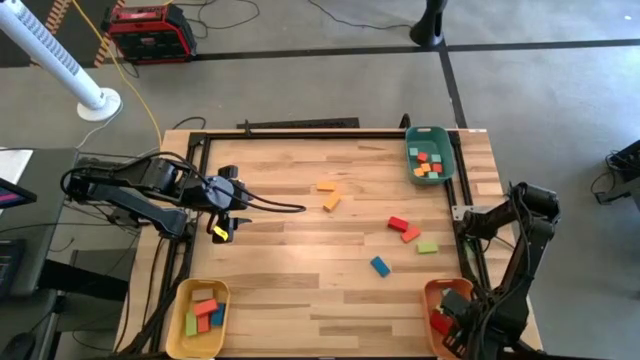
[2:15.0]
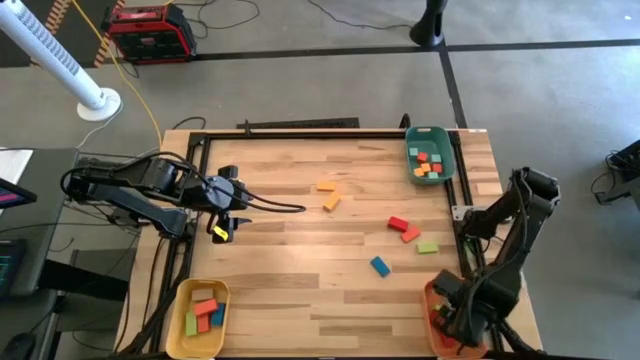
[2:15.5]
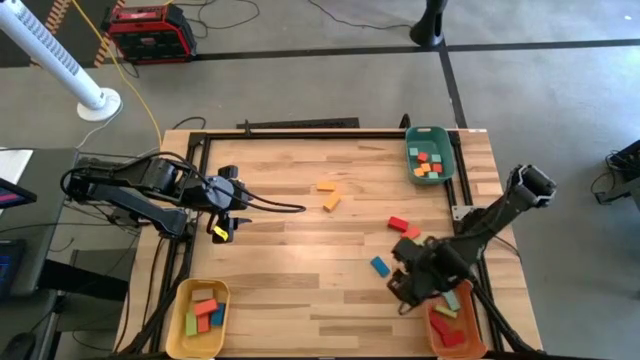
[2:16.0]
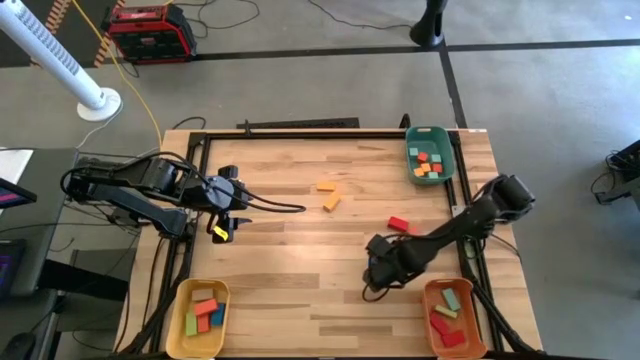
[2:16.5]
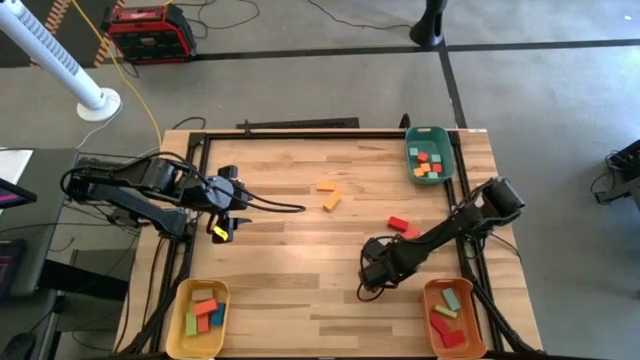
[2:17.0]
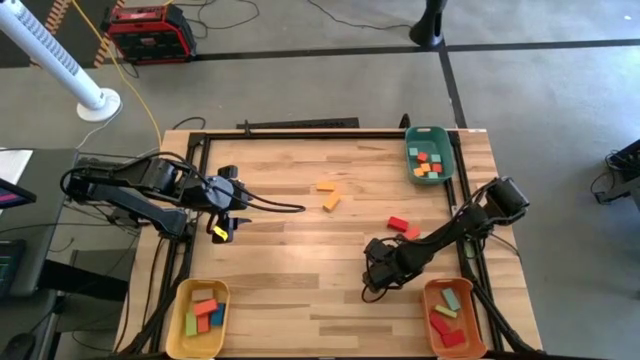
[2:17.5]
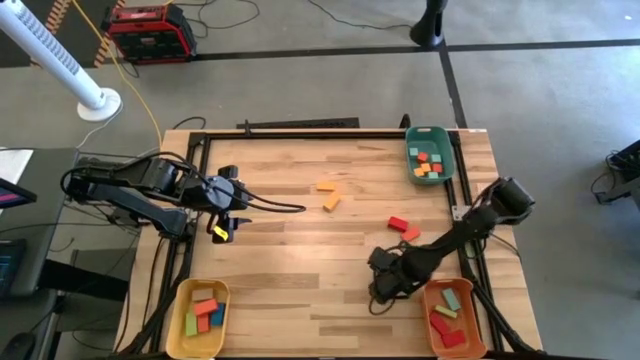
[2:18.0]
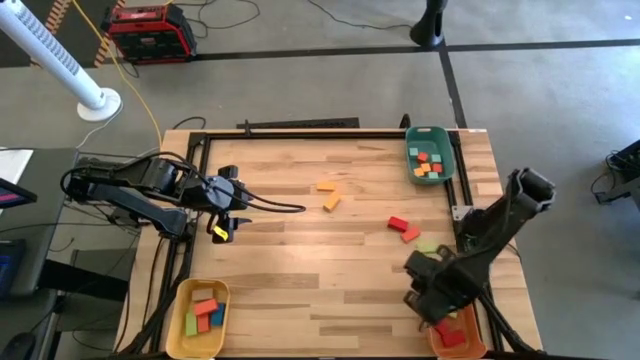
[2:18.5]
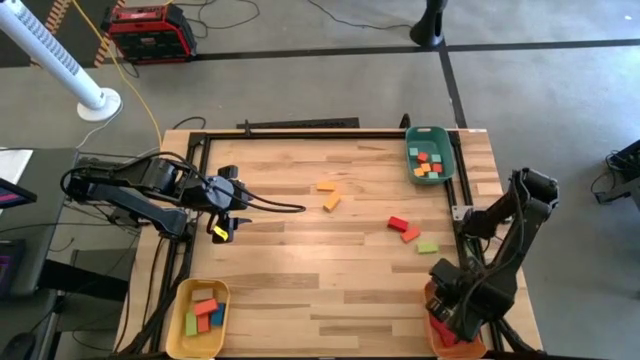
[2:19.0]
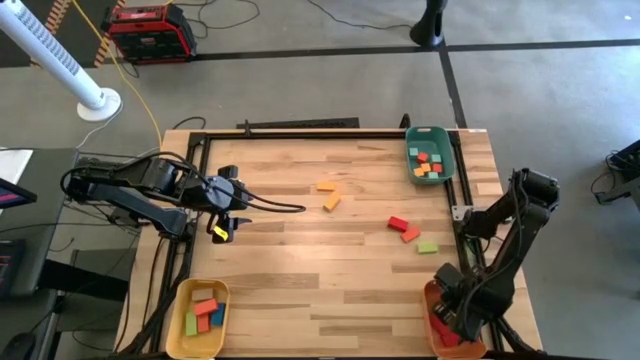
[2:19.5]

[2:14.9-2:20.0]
Task: Sort blocks by size
Put the blue thin rectangle block into the orange bin

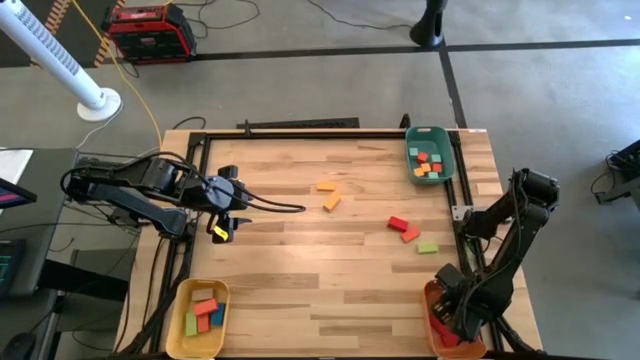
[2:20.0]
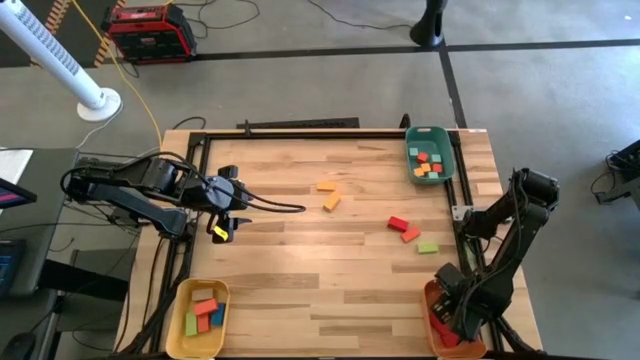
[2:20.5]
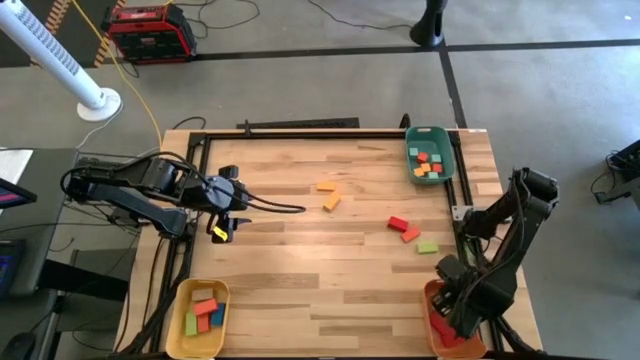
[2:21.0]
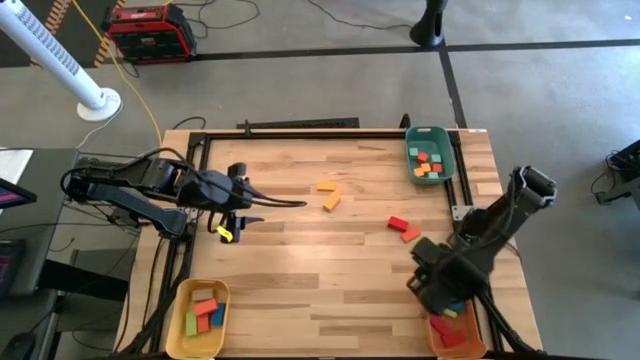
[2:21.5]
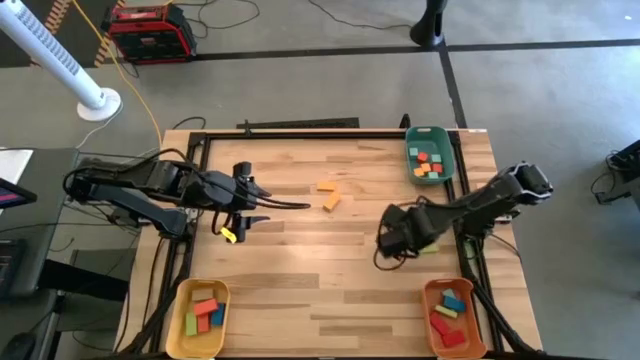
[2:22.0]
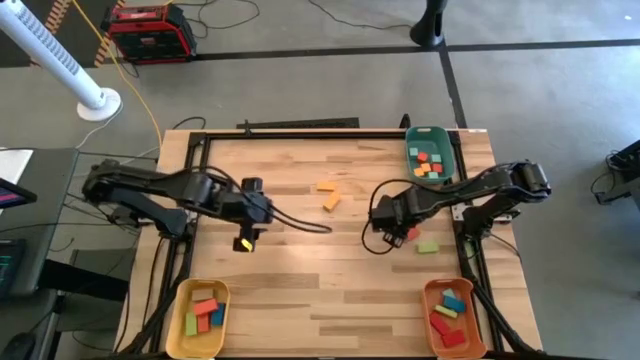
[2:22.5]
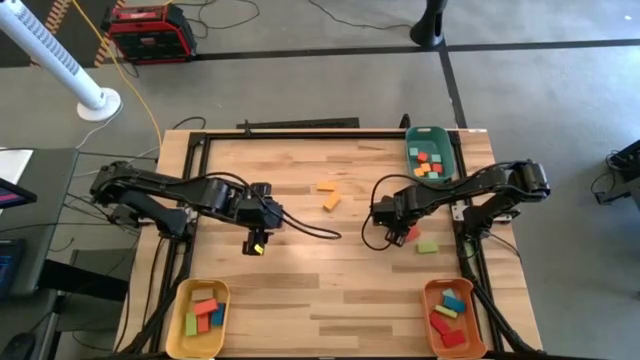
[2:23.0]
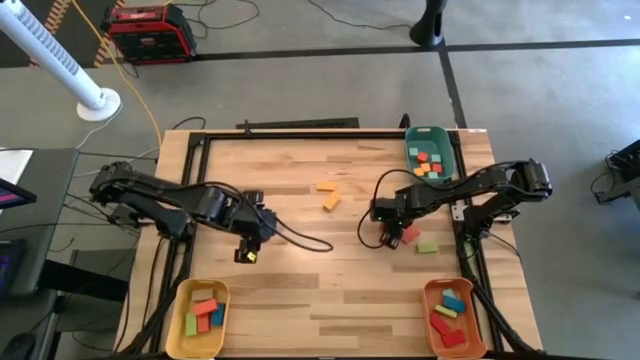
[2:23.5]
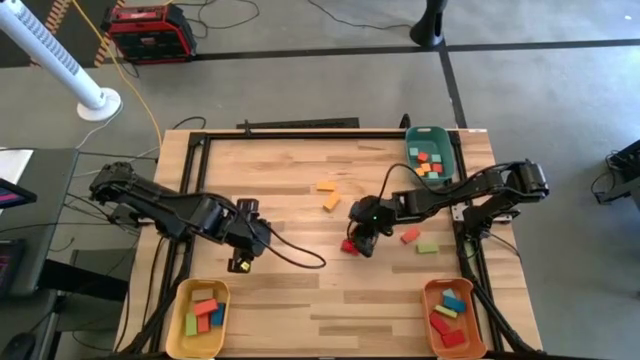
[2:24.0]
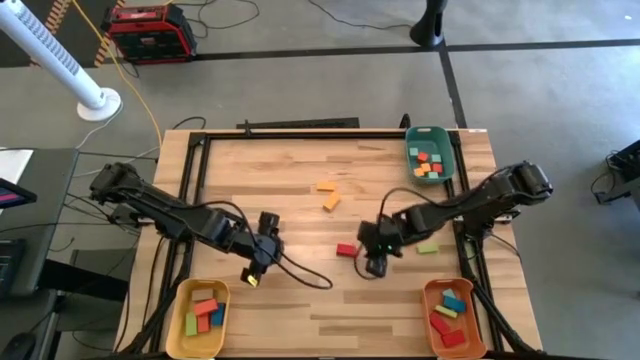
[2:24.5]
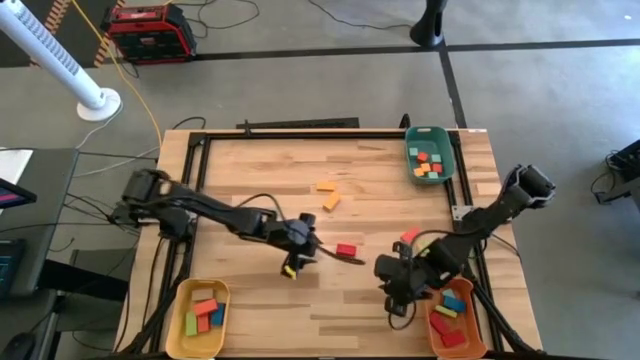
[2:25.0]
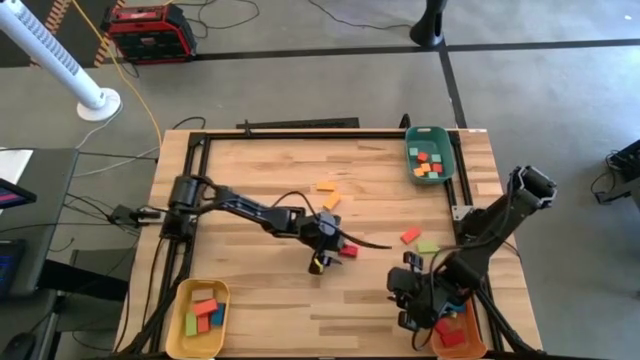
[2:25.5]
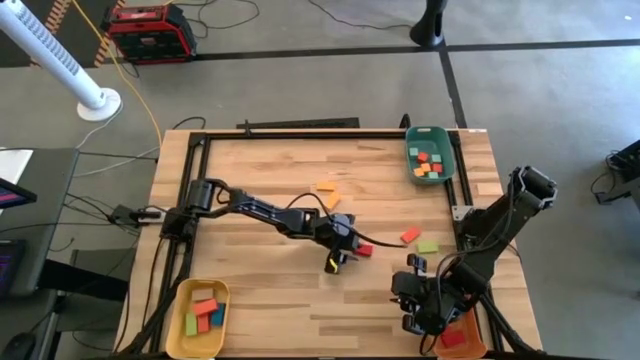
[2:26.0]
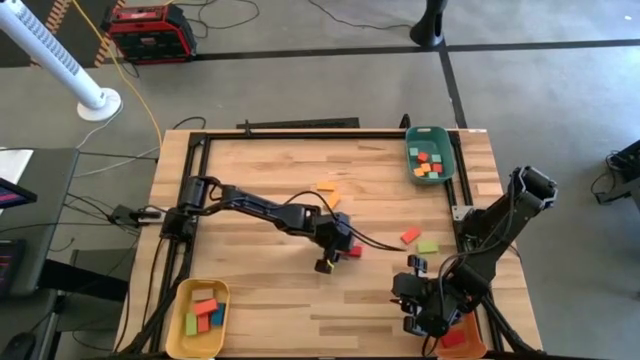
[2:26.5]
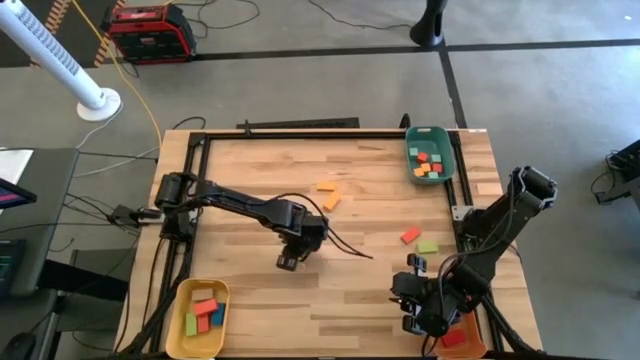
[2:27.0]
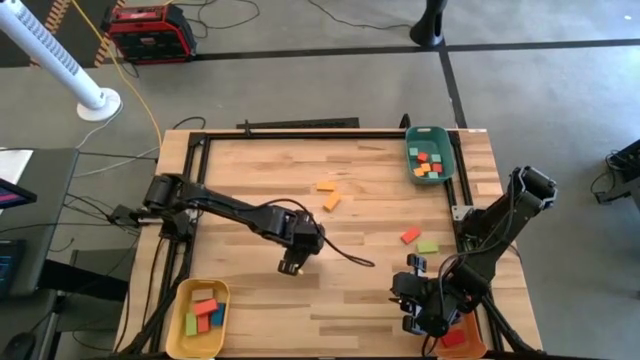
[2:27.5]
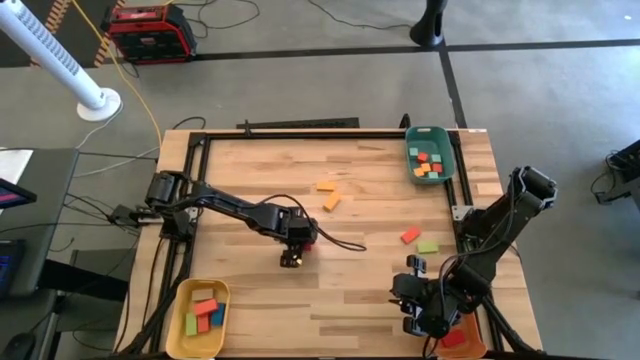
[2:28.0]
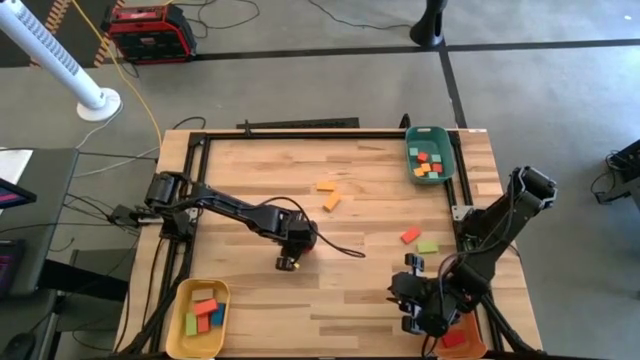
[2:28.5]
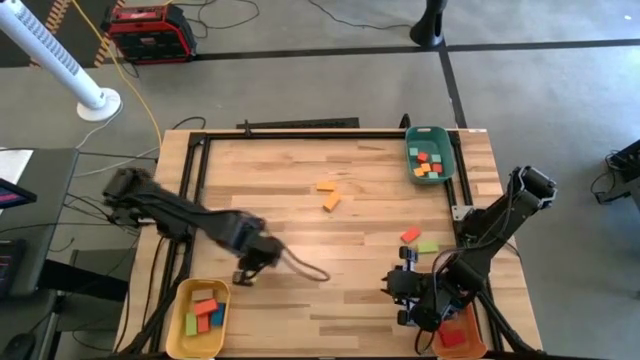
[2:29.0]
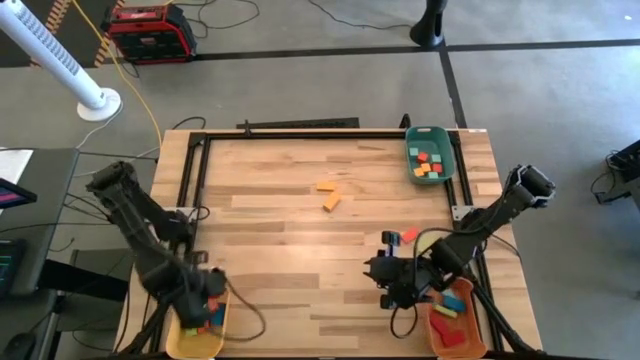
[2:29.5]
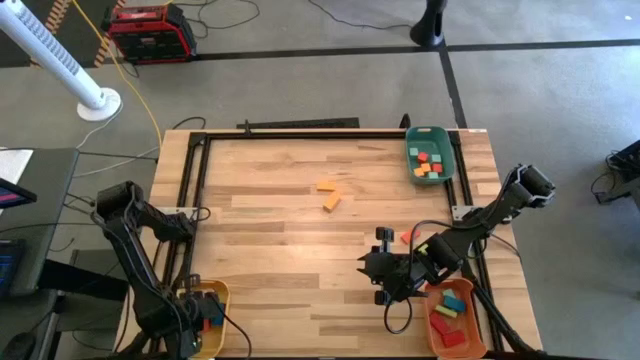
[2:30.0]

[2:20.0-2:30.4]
Put the red thick rectangle block into the yellow bin

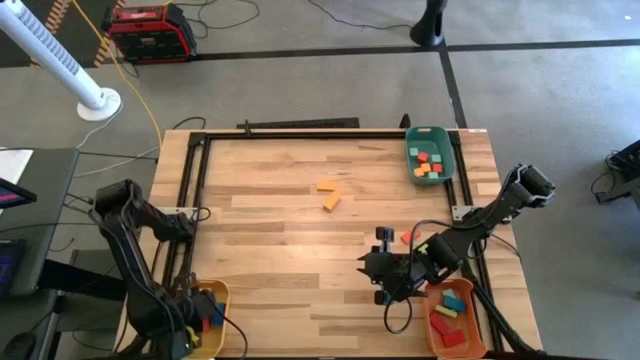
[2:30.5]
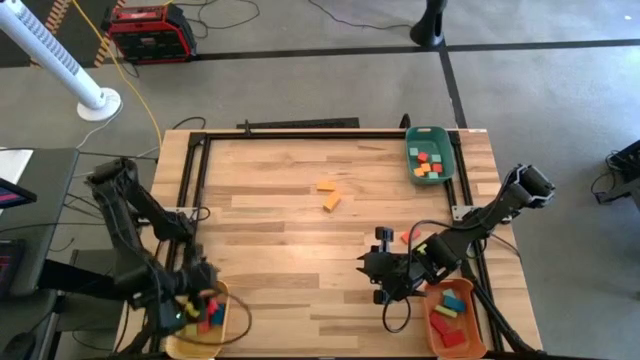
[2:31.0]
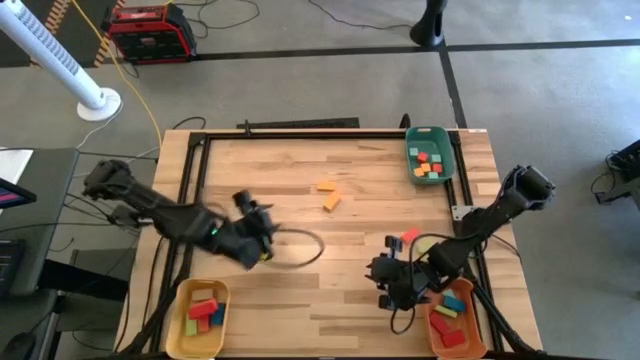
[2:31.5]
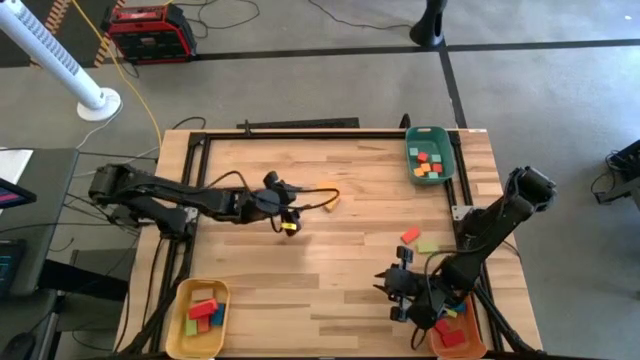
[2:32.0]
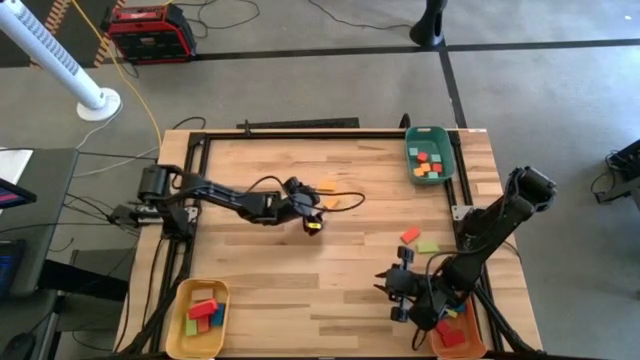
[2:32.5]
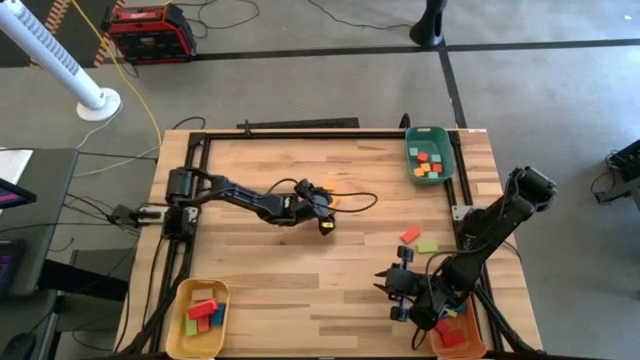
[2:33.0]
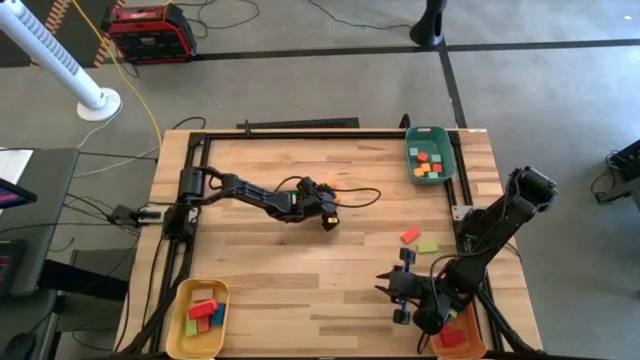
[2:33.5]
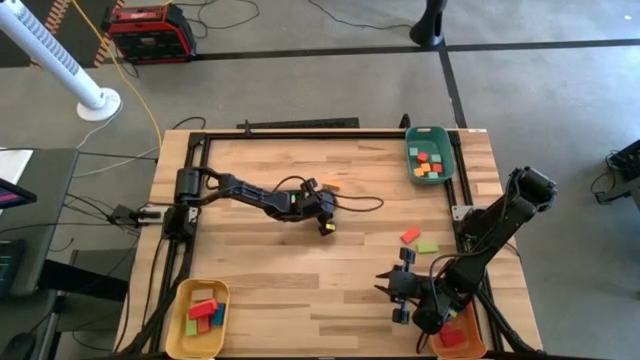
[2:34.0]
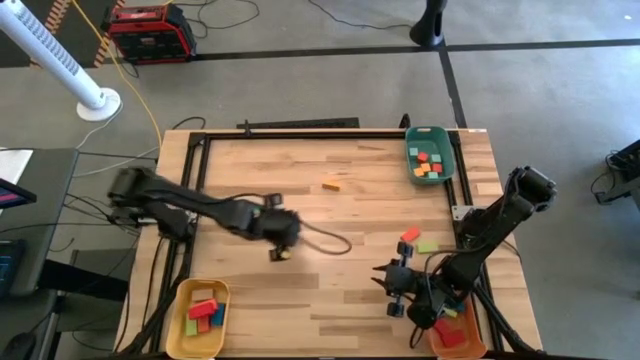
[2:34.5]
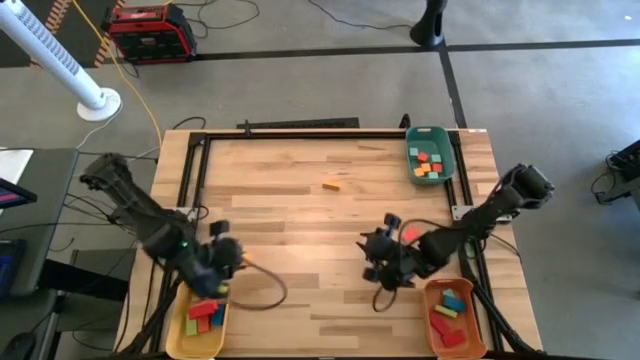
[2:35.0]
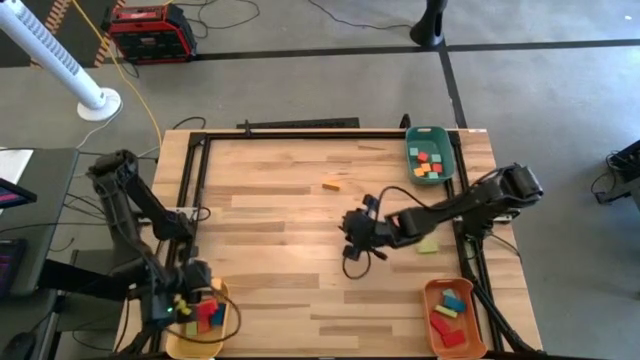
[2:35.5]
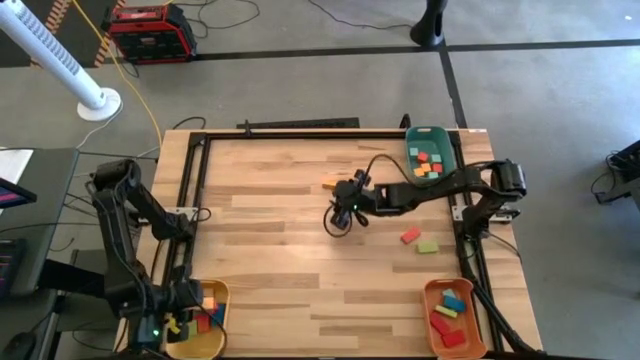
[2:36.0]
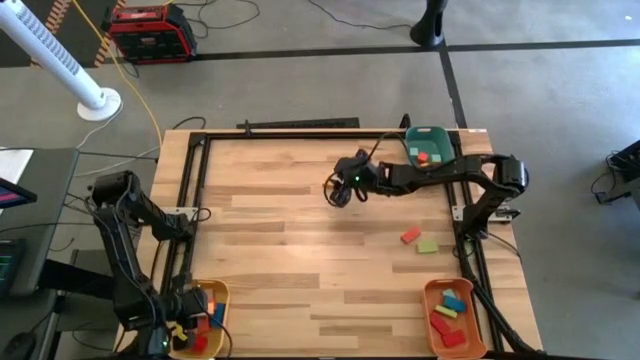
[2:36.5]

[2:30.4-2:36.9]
Put the yellow thick rectangle block into the yellow bin
